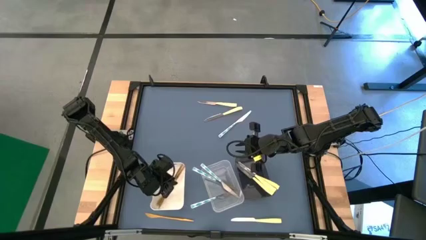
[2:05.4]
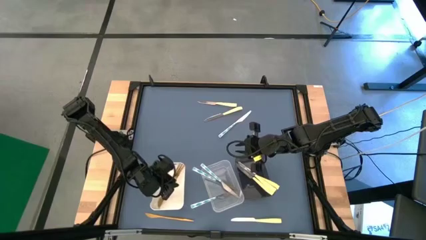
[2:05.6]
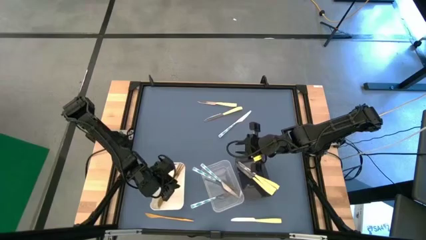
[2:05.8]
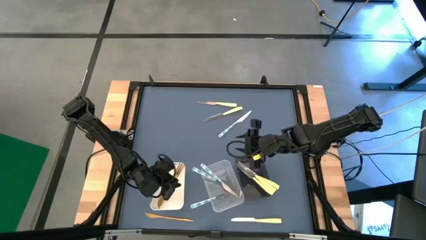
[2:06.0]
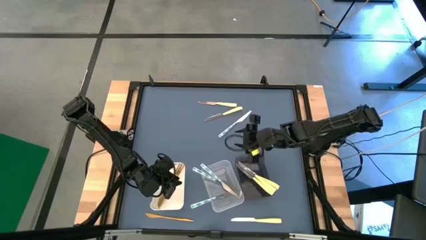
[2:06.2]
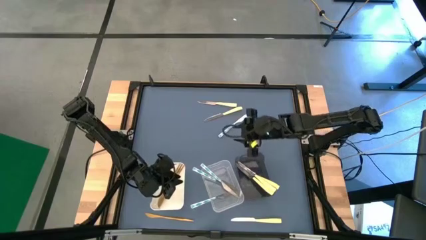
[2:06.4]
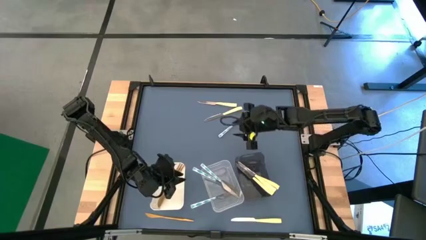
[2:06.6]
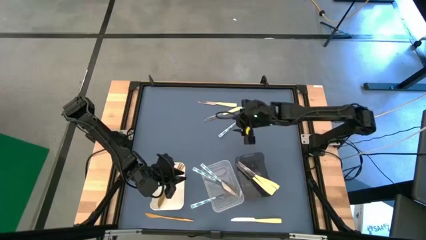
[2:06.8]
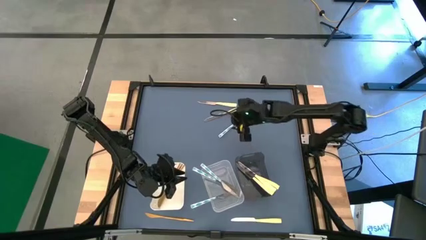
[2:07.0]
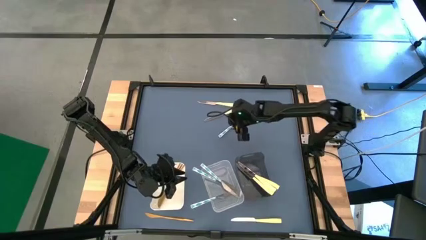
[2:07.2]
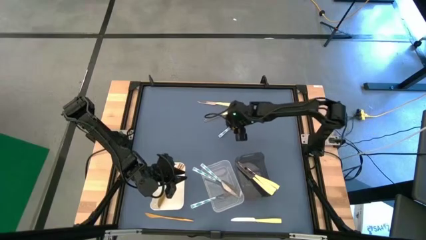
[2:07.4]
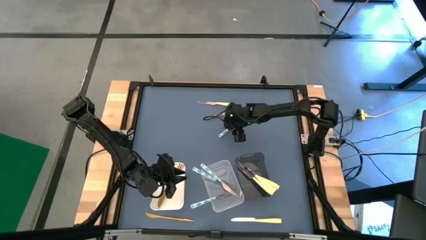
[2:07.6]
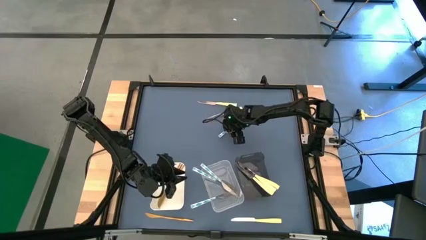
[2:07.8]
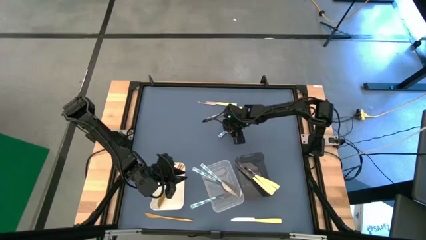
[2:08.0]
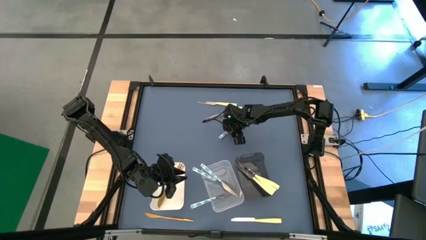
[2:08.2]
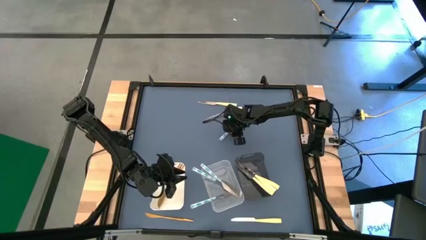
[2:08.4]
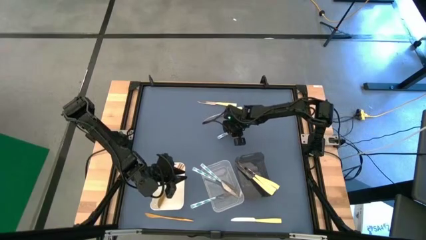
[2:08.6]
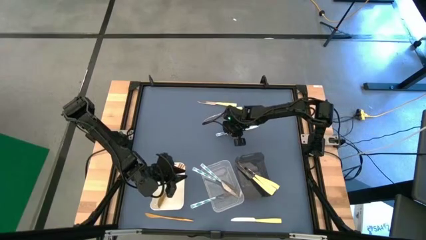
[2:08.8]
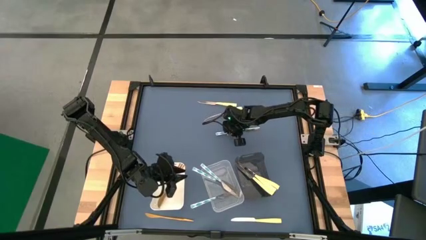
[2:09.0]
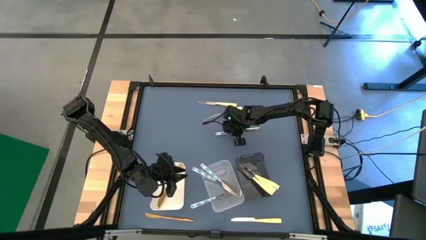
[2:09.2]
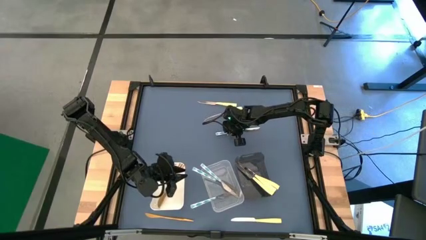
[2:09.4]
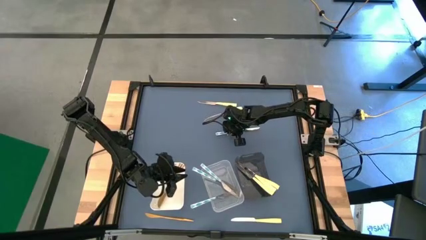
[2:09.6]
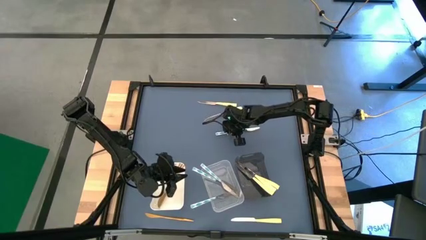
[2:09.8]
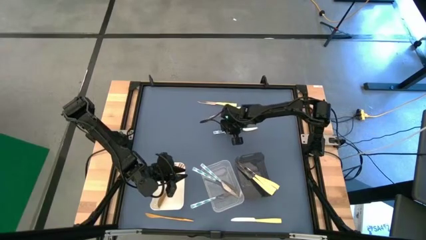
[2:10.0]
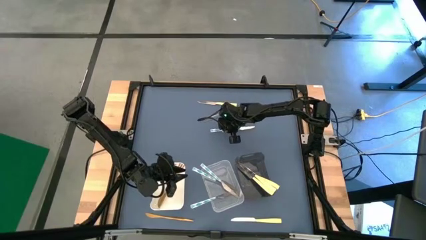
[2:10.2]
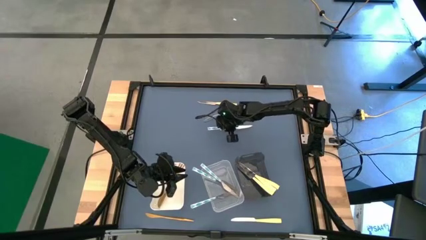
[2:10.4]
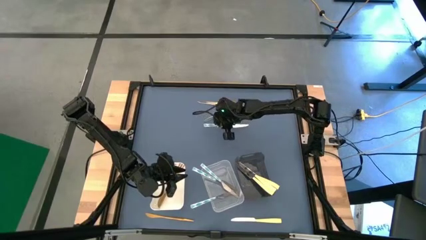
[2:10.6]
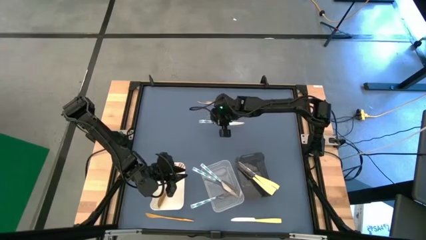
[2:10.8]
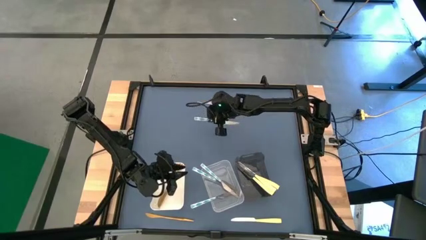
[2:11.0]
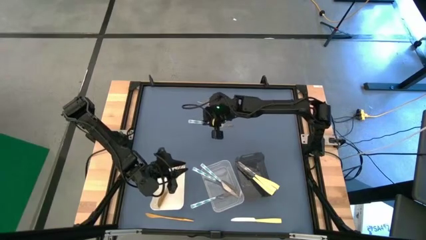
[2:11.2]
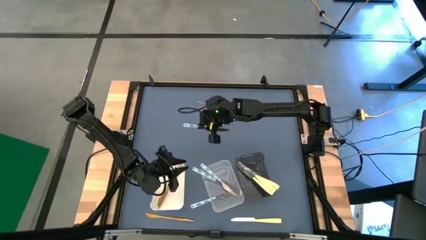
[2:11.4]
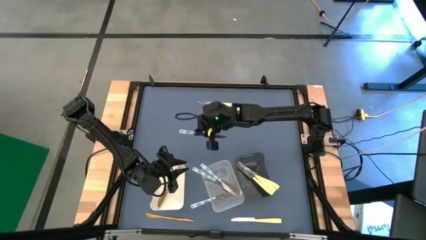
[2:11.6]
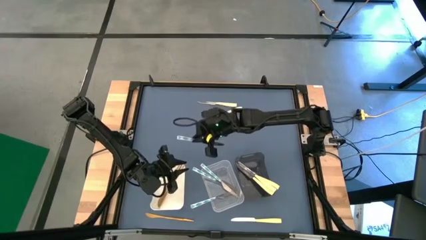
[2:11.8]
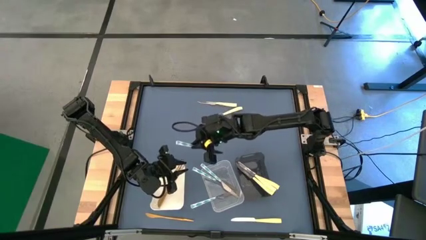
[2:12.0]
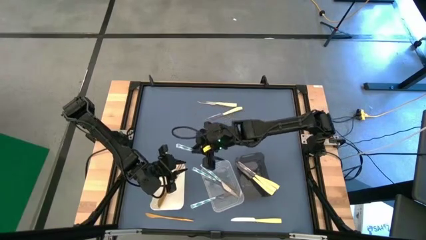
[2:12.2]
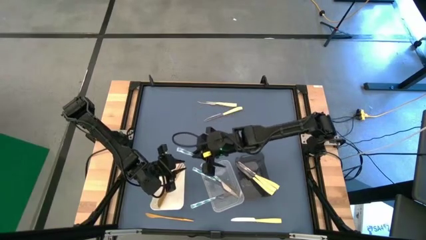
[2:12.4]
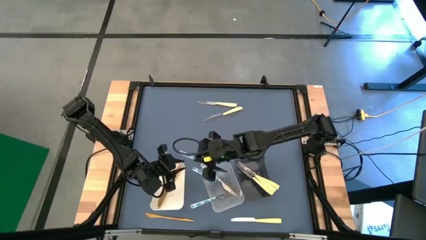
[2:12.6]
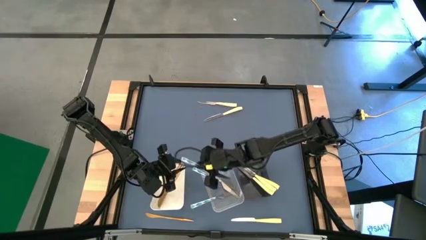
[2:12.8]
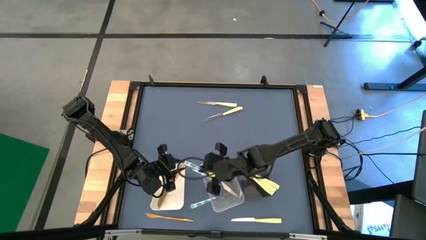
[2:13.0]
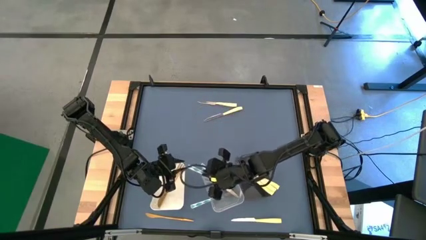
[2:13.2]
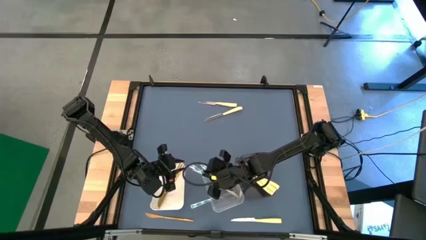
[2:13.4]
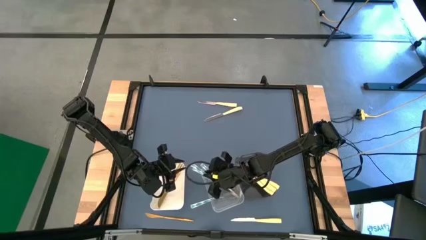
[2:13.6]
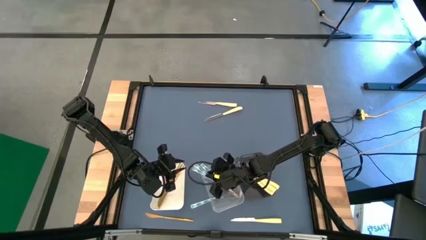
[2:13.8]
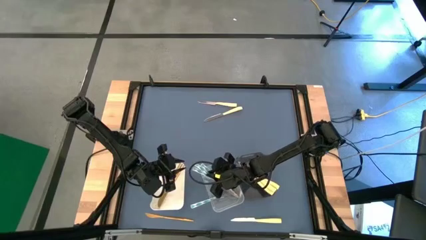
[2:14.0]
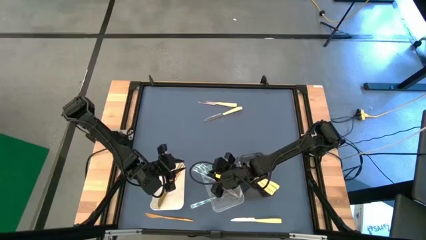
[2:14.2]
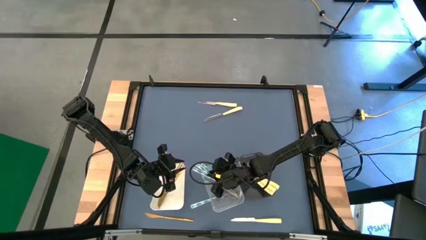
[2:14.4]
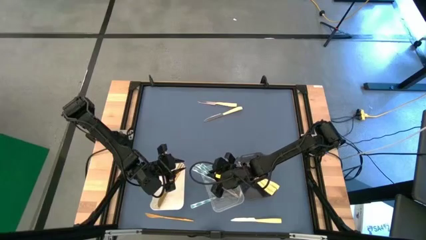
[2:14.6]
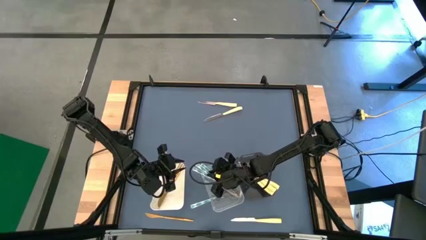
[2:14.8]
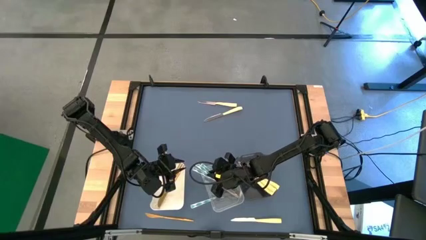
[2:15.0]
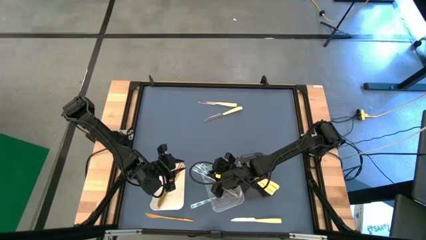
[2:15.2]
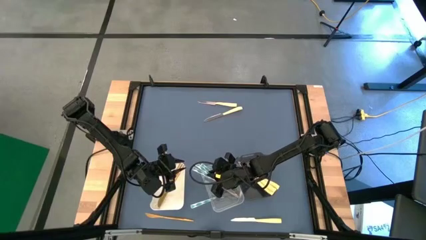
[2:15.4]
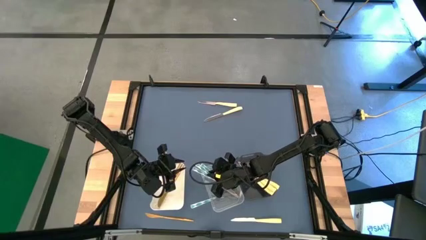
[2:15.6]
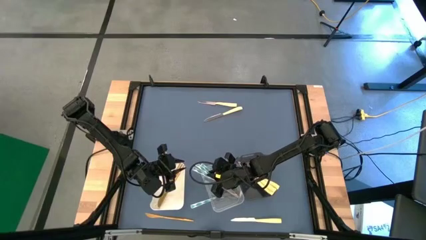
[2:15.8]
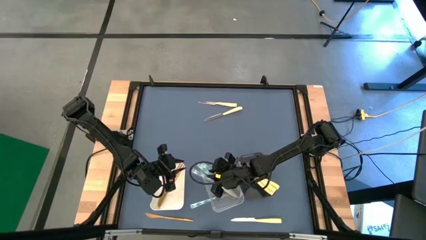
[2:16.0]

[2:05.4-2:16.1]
Task: Sort silverware by color (type)
Put the blue patterned table knife into the transparent bin

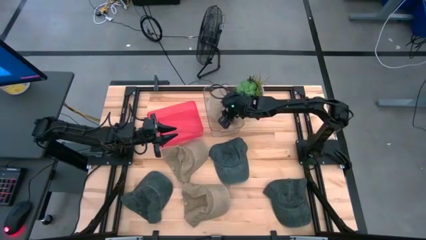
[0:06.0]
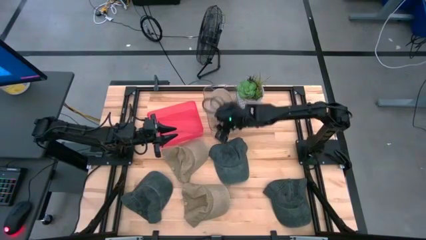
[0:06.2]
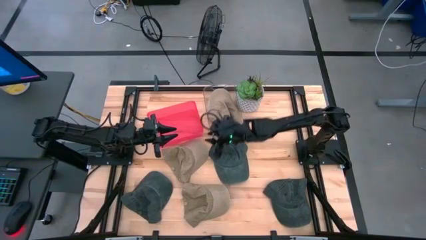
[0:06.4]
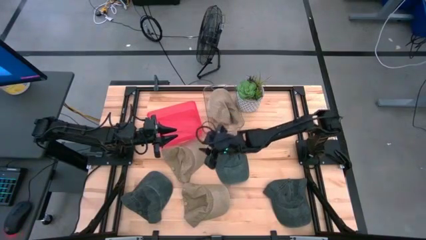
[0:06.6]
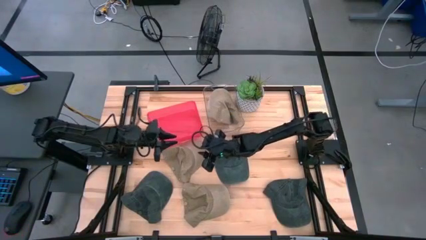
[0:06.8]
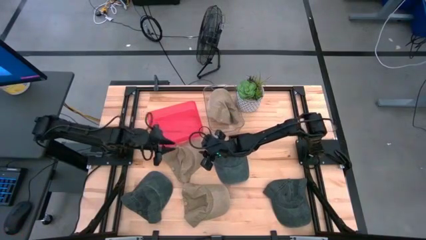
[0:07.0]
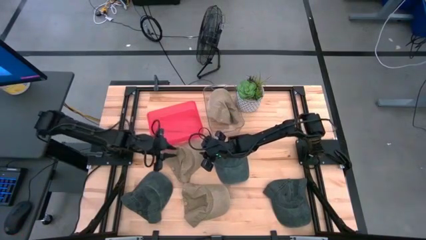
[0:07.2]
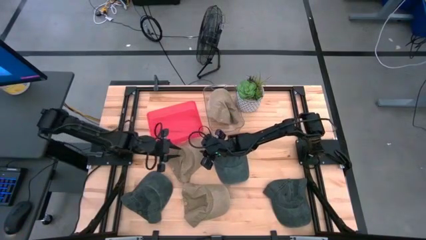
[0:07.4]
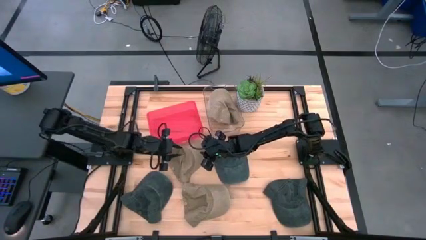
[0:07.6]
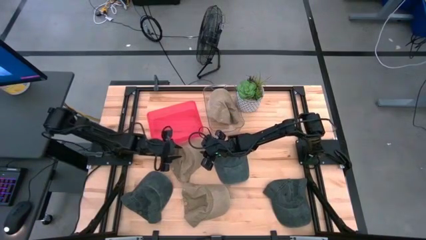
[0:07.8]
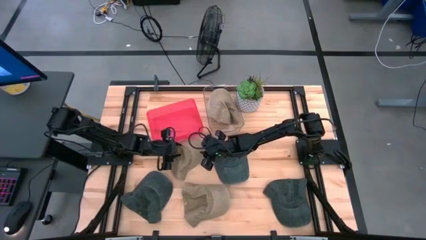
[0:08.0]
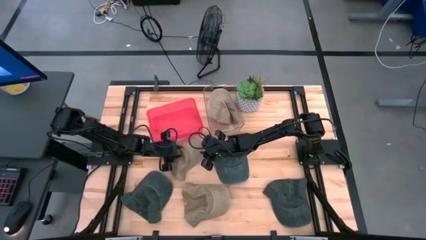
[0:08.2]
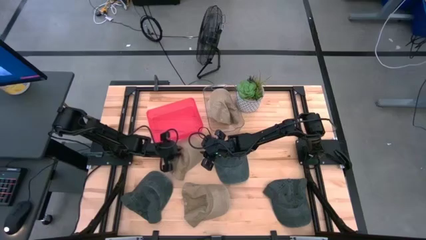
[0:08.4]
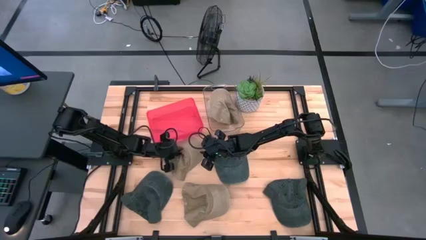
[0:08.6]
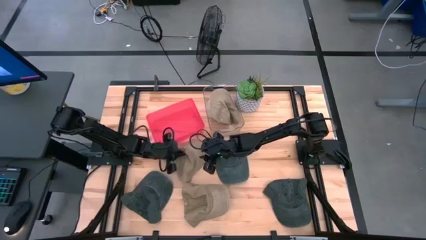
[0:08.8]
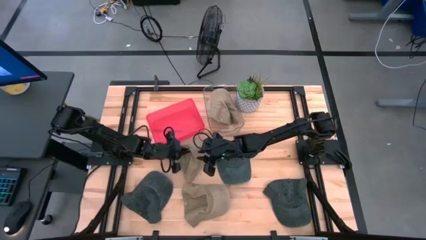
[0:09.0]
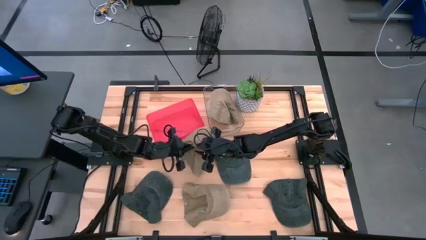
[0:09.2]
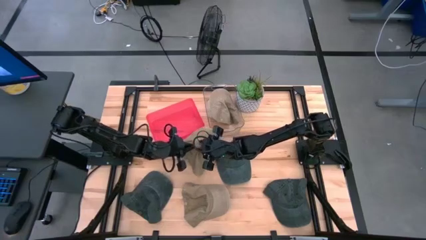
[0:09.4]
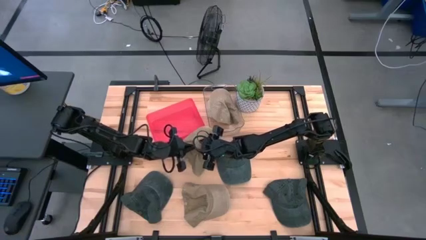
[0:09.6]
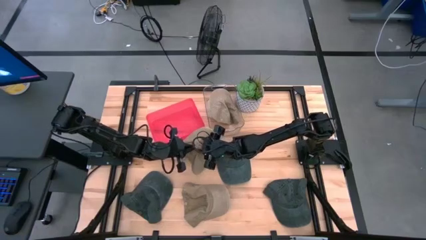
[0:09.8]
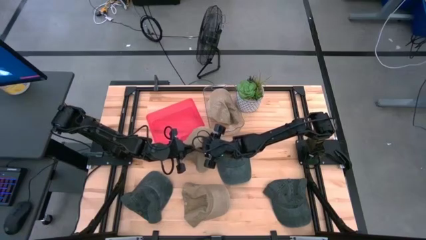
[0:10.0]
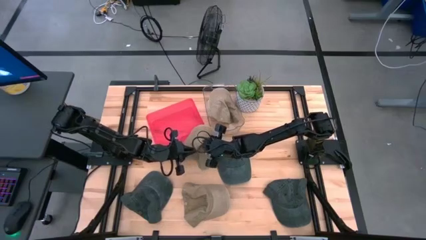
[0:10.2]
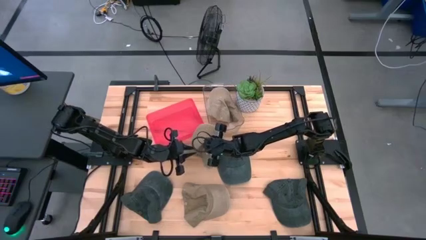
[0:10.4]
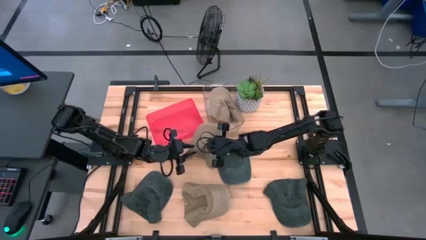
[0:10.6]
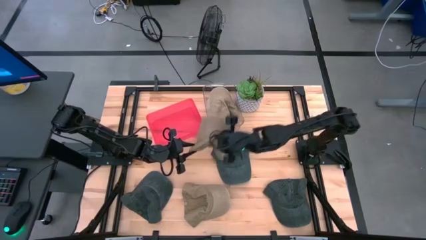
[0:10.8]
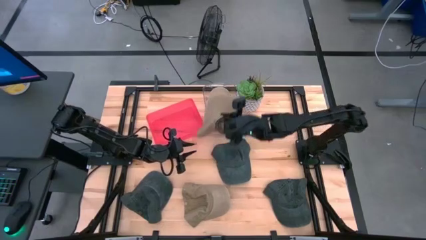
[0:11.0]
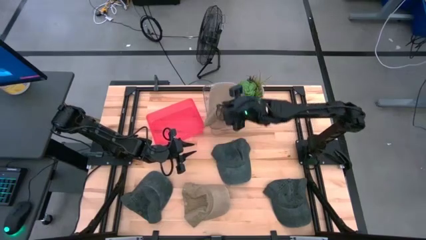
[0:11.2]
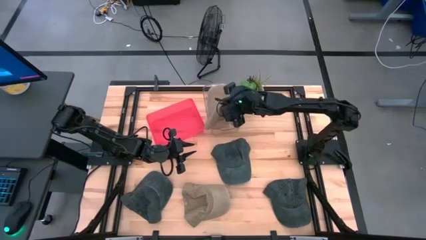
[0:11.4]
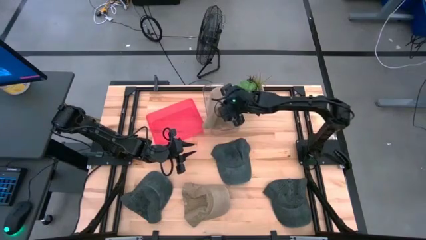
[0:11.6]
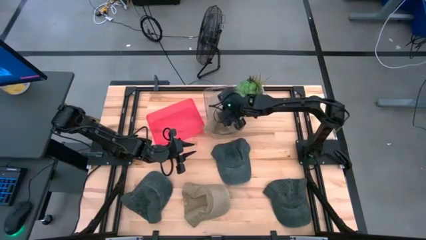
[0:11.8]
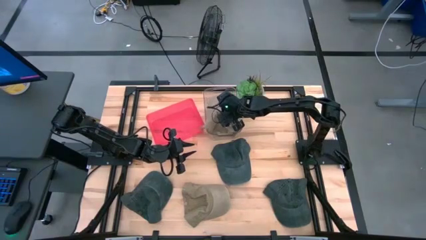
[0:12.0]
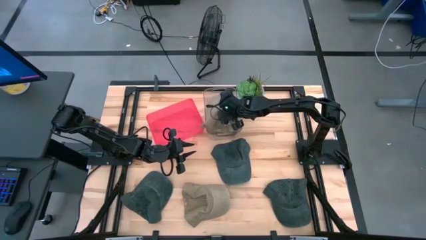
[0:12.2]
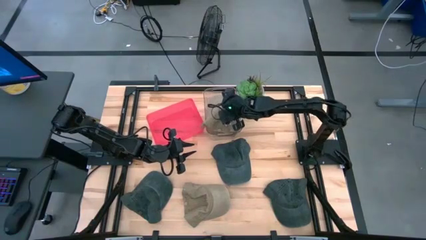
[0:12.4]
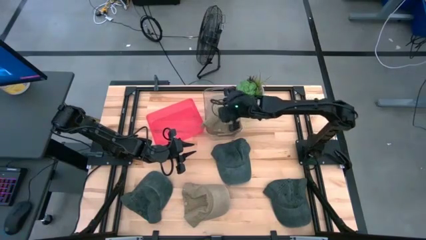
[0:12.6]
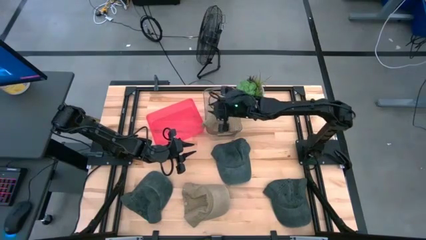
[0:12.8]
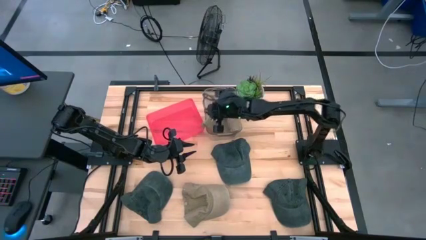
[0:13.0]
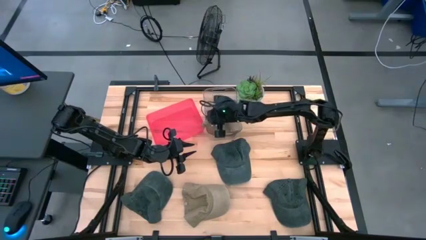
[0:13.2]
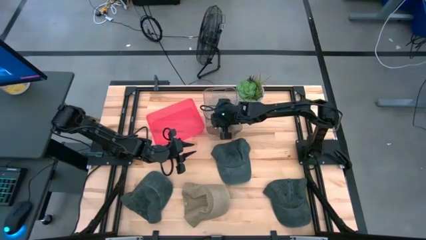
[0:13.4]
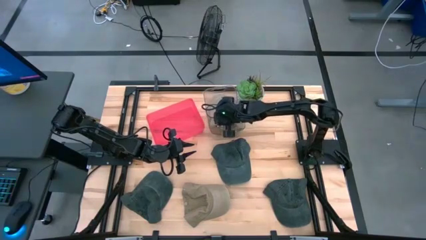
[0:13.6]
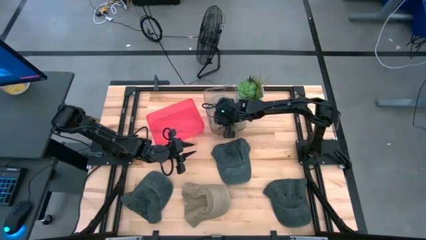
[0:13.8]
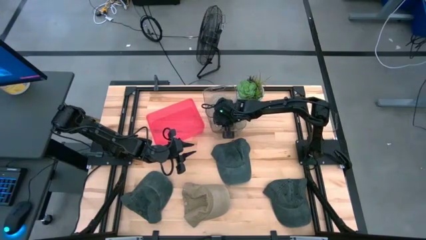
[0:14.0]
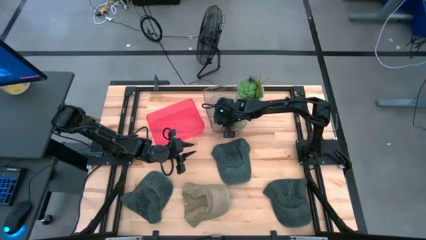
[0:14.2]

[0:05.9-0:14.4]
Task: Pick & Place hat
Put the top brown cap into the transparent bin
